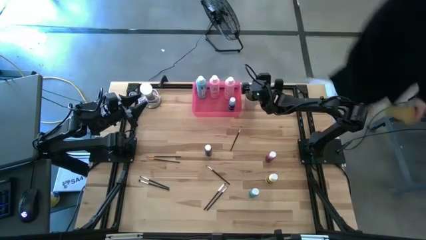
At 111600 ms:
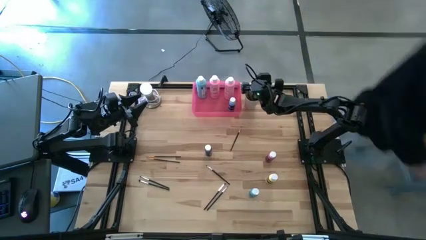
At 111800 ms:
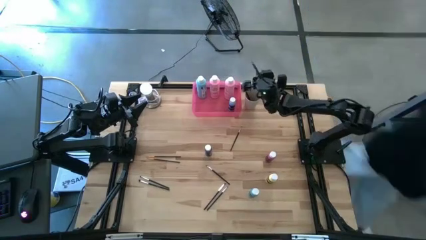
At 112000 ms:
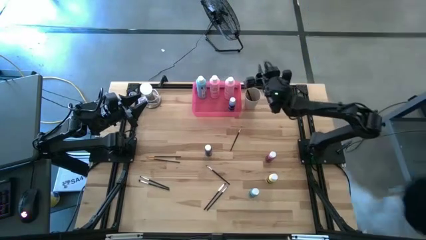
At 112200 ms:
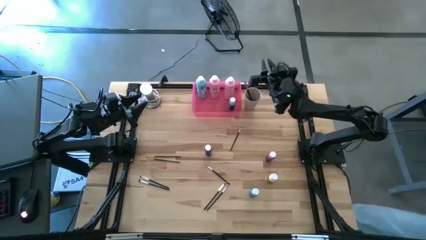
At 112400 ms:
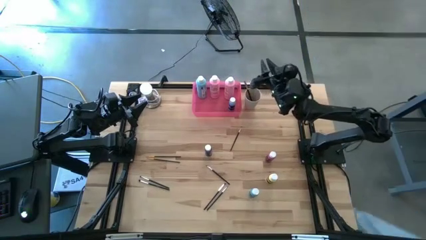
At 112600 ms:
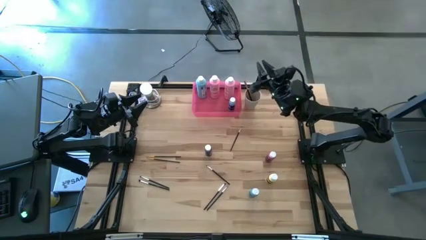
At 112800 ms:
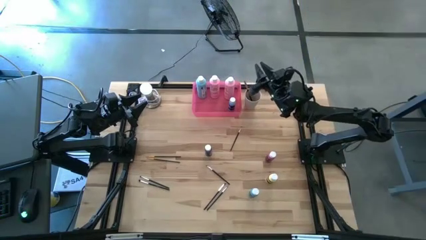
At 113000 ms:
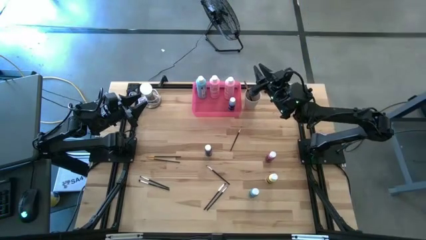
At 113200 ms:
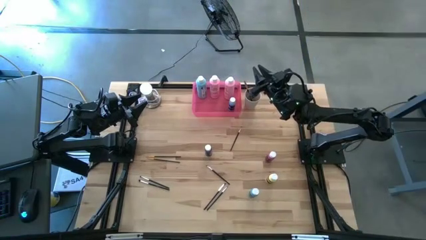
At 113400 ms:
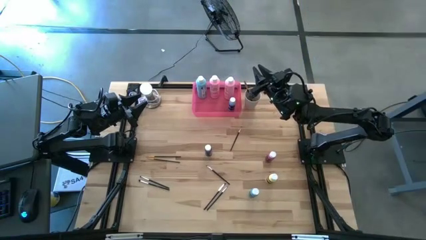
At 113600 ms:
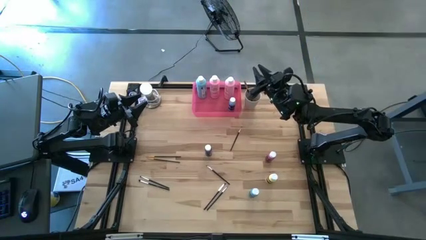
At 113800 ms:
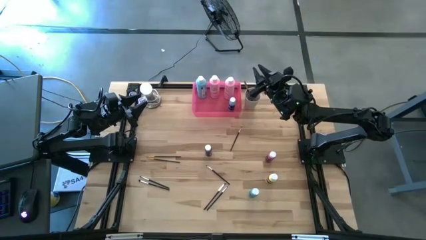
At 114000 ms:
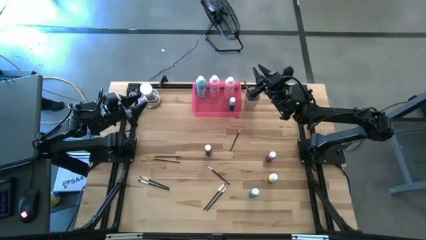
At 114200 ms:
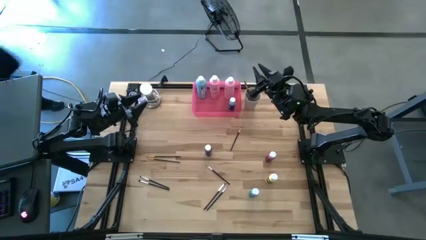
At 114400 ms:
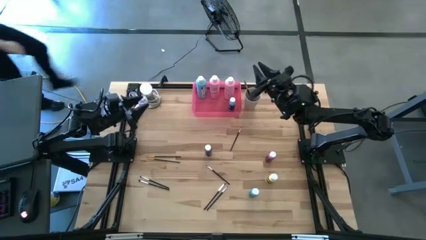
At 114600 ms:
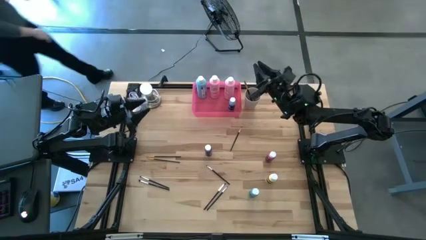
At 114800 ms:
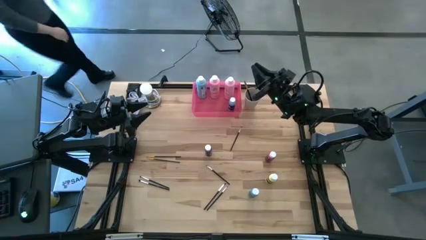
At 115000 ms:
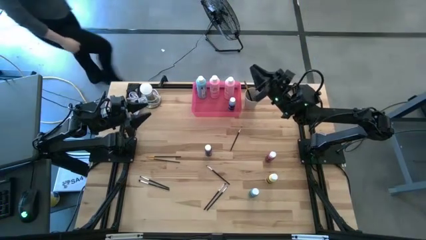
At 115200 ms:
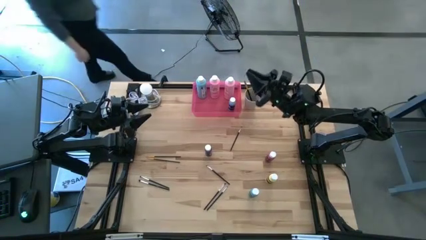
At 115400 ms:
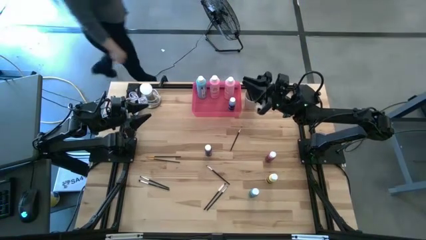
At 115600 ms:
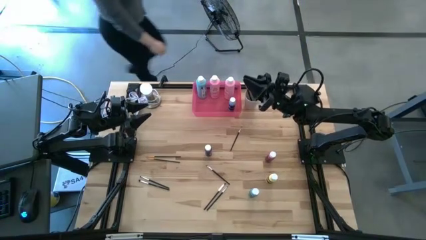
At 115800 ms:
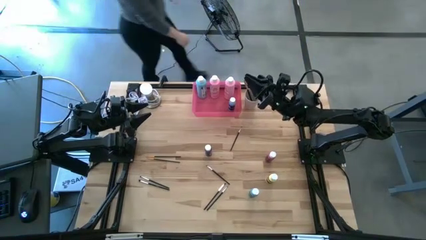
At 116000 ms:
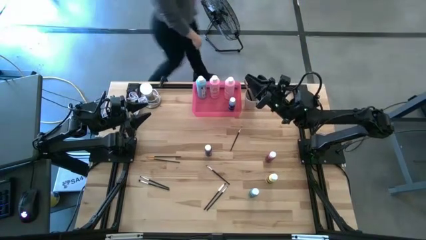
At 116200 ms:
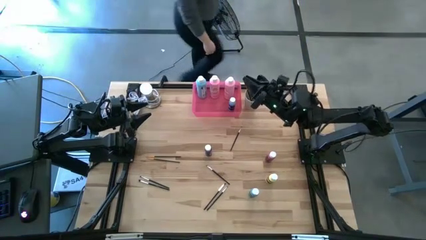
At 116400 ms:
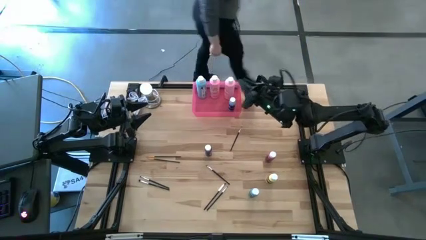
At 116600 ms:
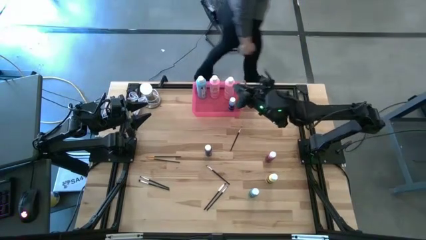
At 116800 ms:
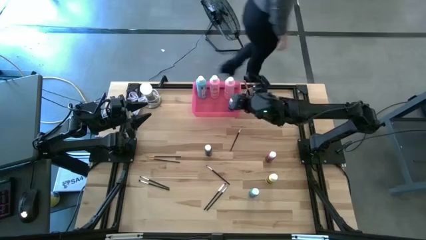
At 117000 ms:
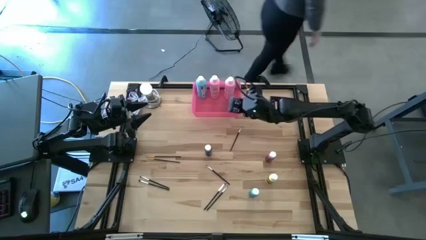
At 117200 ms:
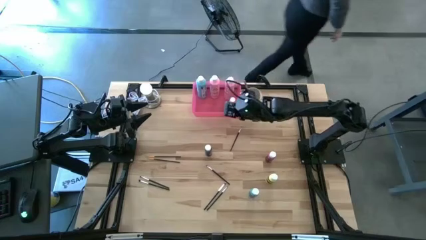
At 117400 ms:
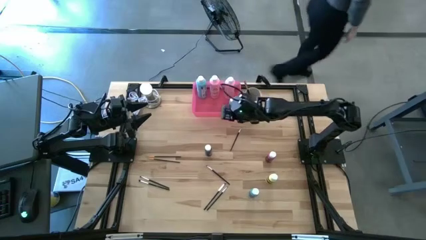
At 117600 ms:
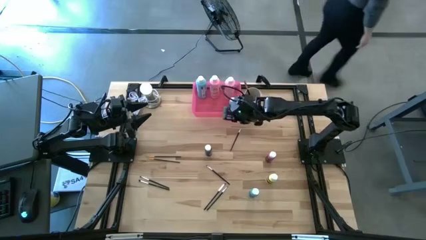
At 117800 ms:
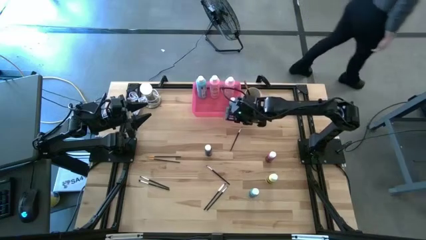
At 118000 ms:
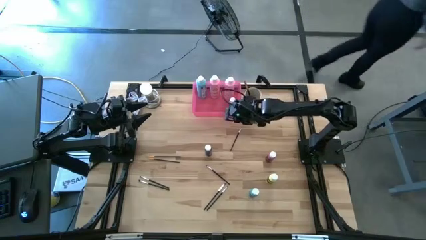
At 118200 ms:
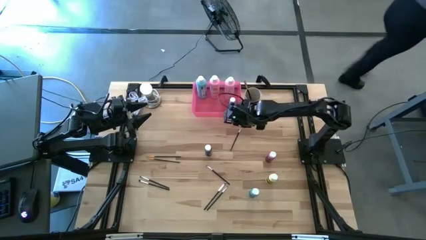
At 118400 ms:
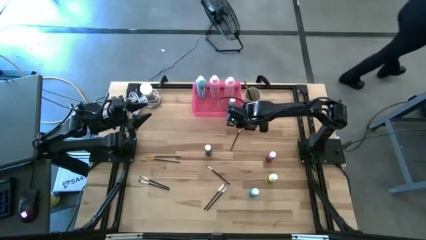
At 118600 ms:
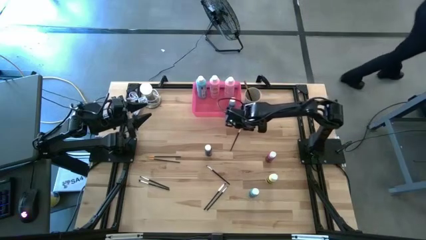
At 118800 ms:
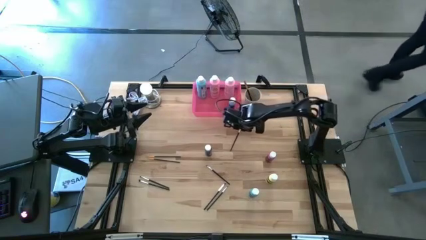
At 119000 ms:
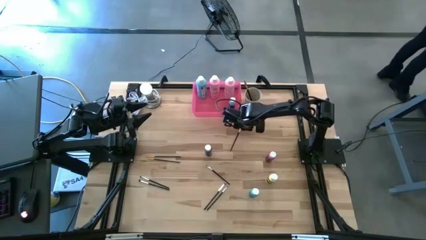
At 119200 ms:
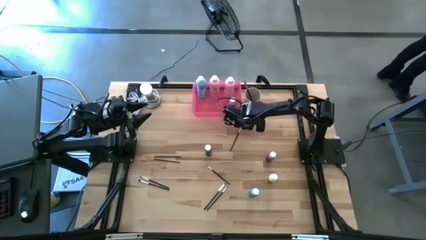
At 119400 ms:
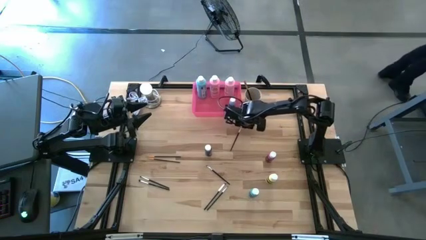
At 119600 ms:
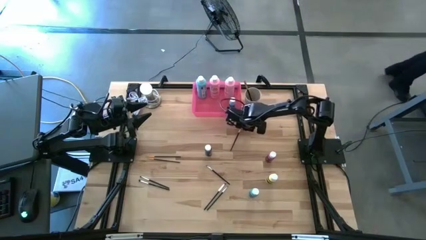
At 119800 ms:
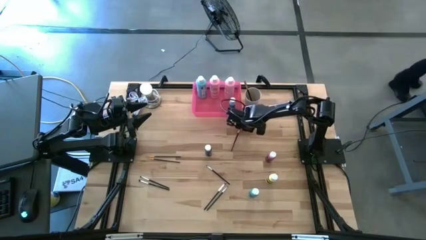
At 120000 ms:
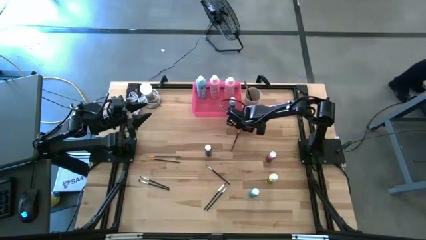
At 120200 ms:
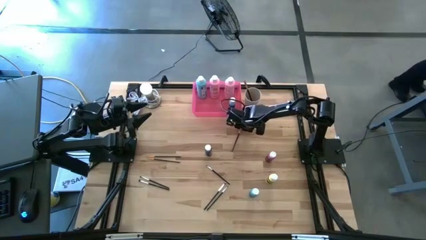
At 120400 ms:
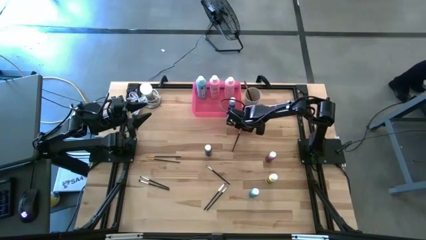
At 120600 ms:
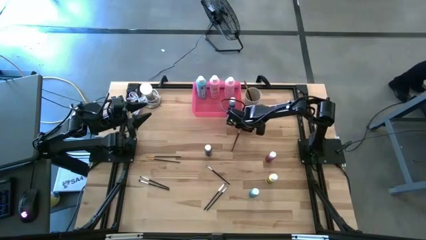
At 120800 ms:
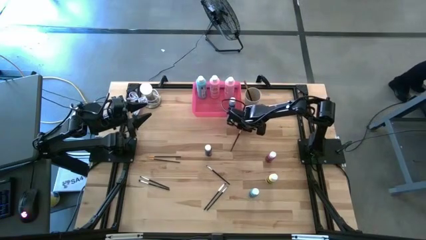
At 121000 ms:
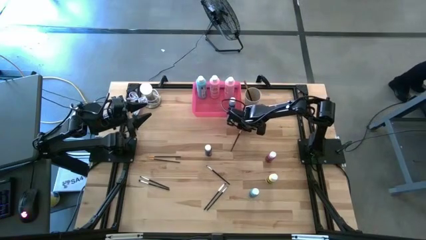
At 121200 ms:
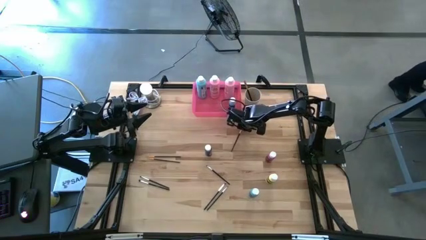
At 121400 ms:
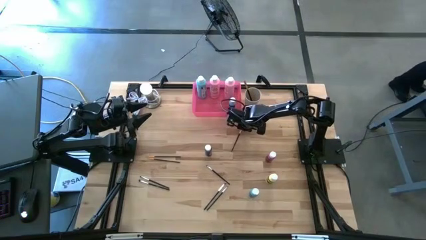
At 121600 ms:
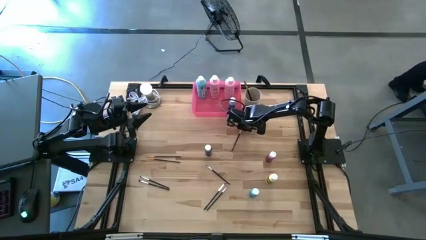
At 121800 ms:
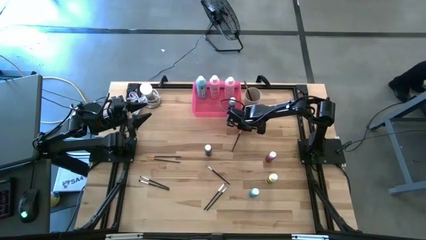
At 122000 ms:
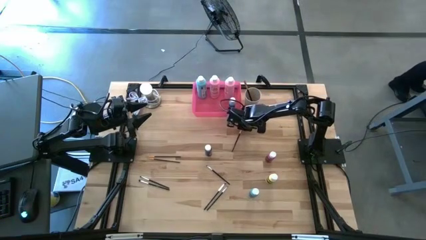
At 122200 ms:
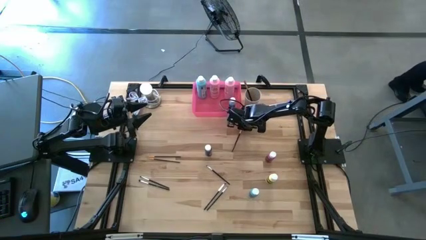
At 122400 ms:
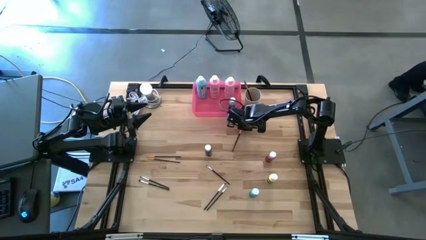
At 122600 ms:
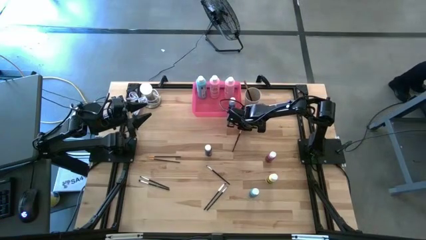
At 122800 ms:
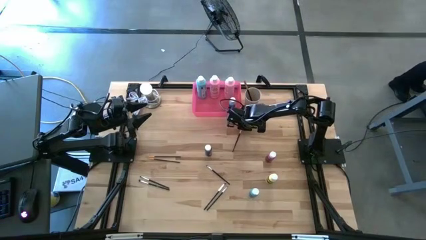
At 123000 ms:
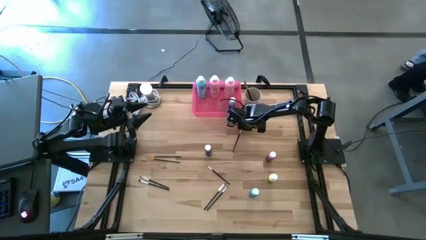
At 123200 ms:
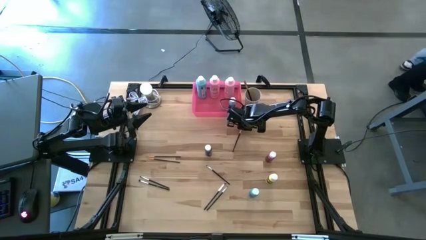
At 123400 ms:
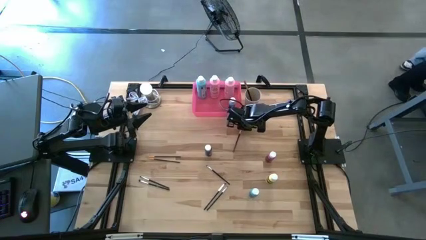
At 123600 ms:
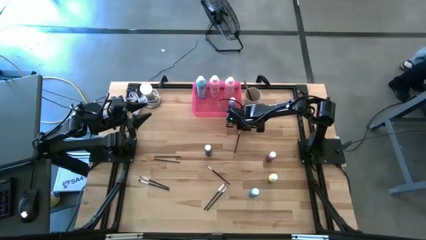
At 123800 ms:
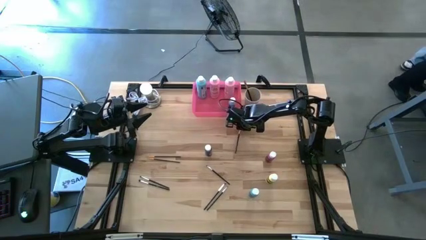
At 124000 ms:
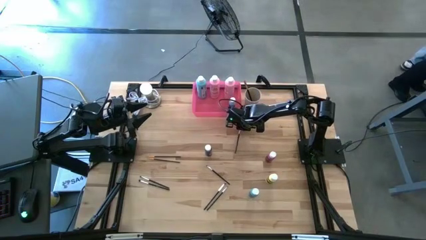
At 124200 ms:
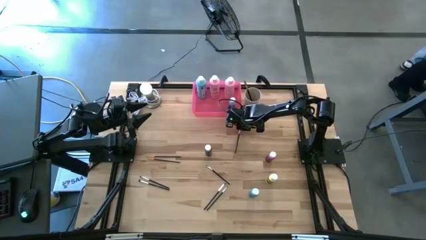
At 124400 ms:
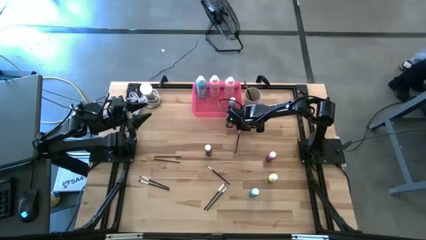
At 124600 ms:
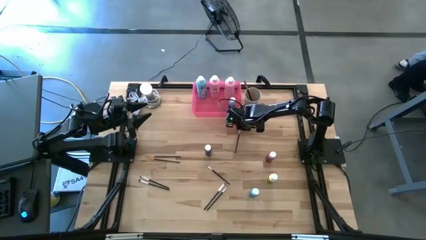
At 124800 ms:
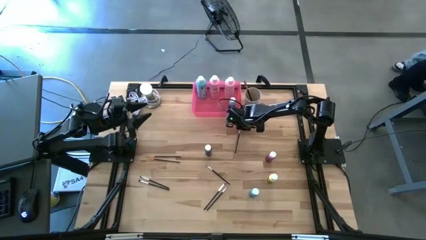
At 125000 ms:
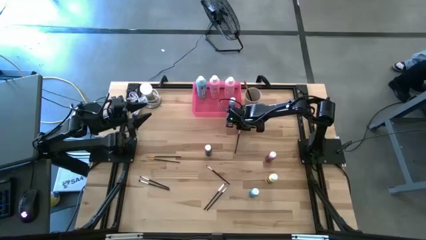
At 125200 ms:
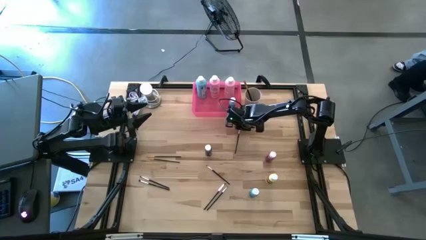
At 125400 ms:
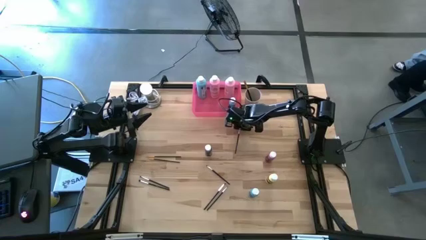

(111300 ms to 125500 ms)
Task: Pick & Place Paint Supplies
Put the silver paintbrush into the white cup
